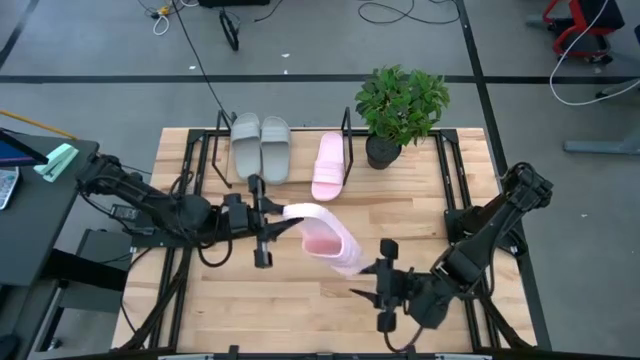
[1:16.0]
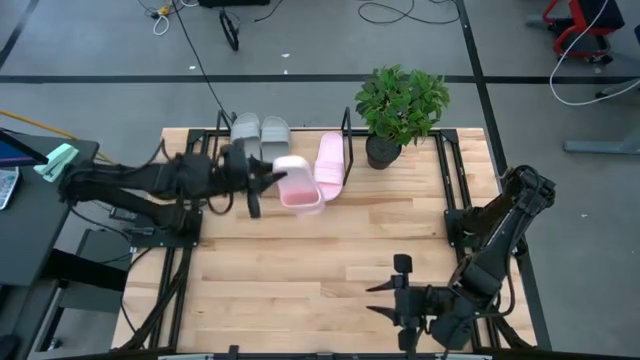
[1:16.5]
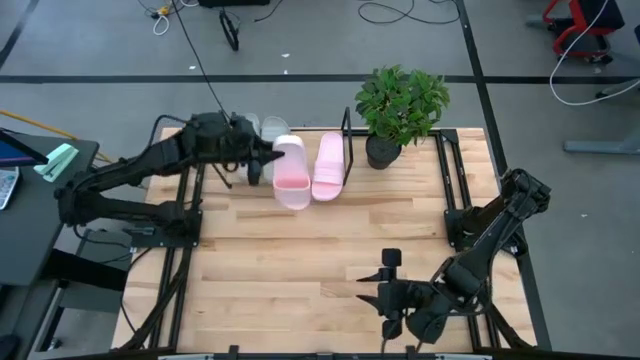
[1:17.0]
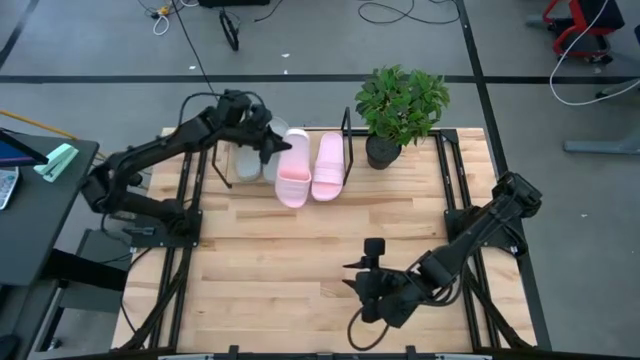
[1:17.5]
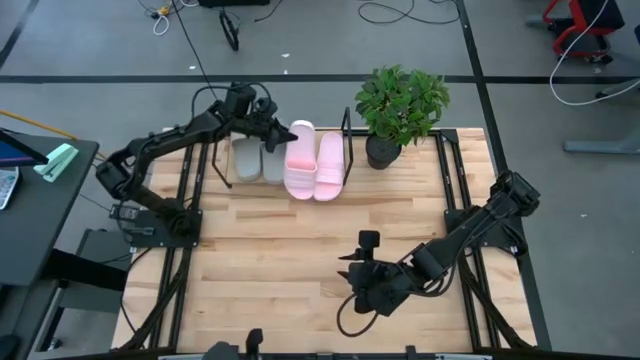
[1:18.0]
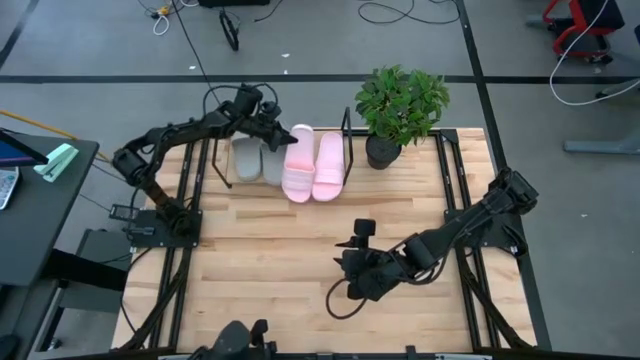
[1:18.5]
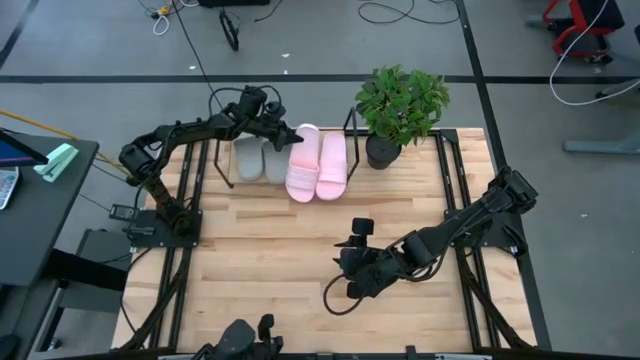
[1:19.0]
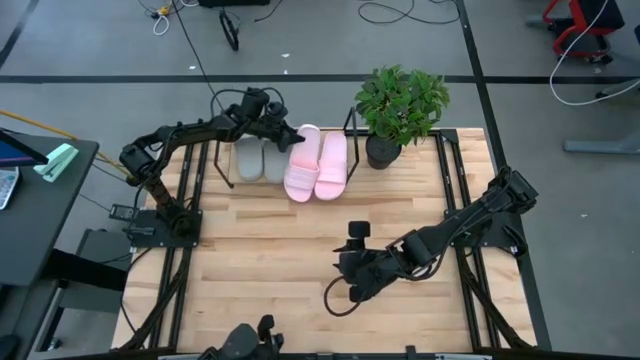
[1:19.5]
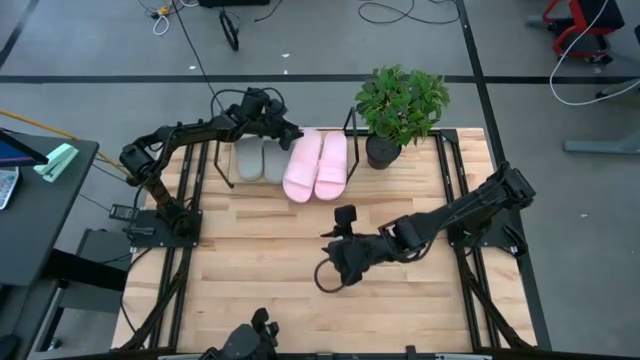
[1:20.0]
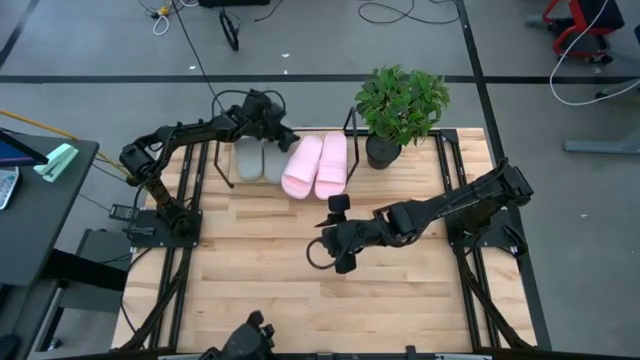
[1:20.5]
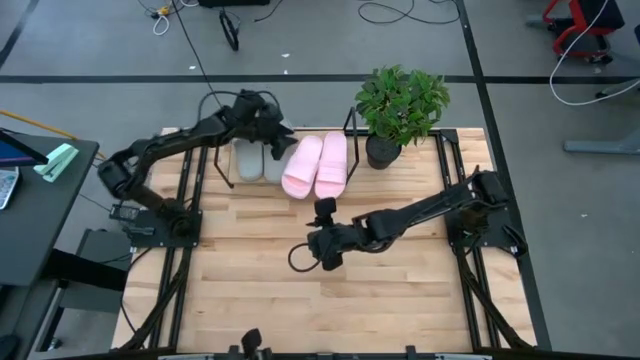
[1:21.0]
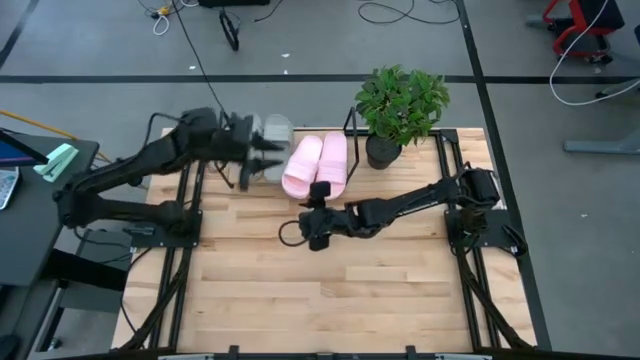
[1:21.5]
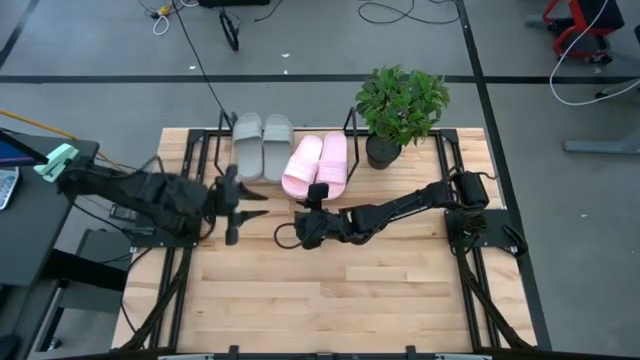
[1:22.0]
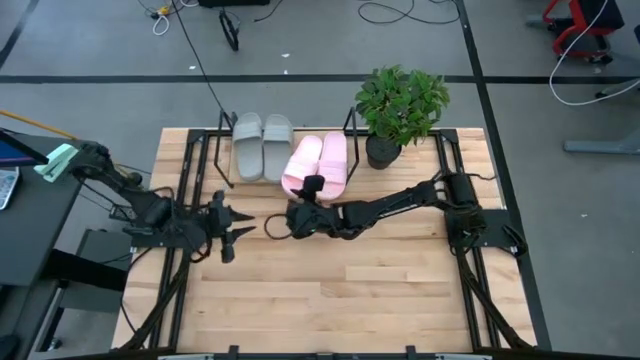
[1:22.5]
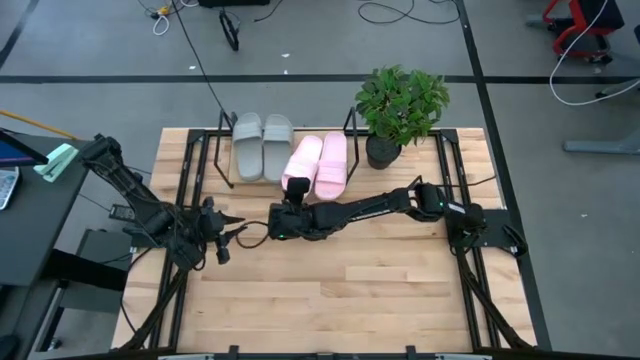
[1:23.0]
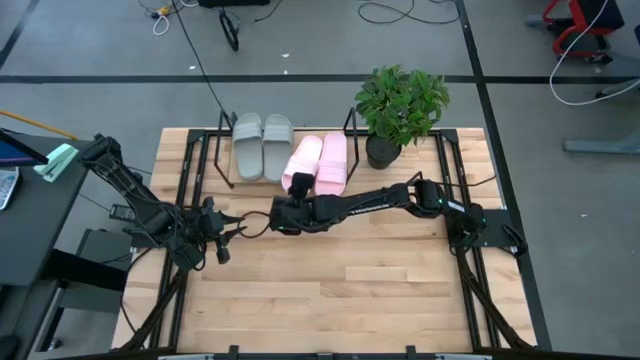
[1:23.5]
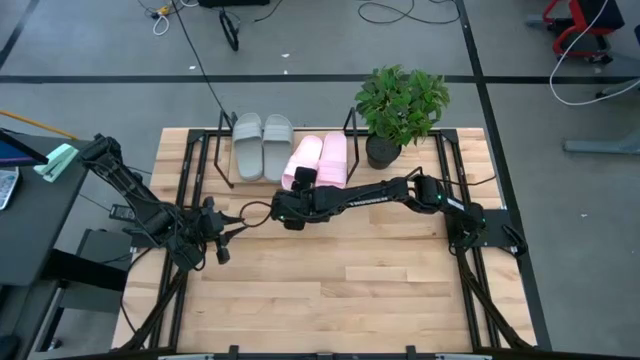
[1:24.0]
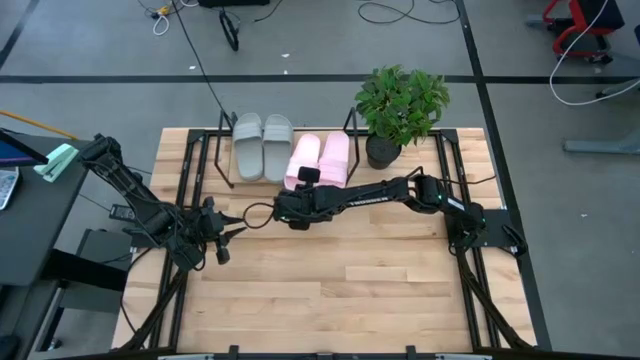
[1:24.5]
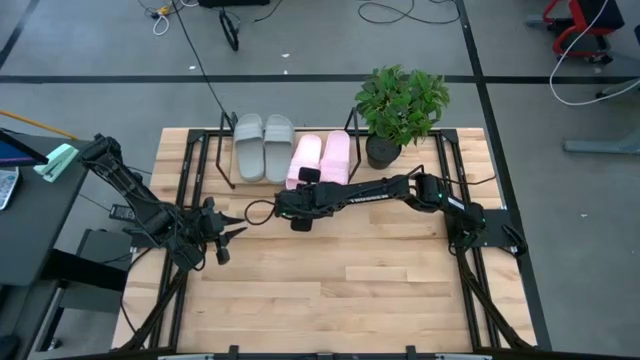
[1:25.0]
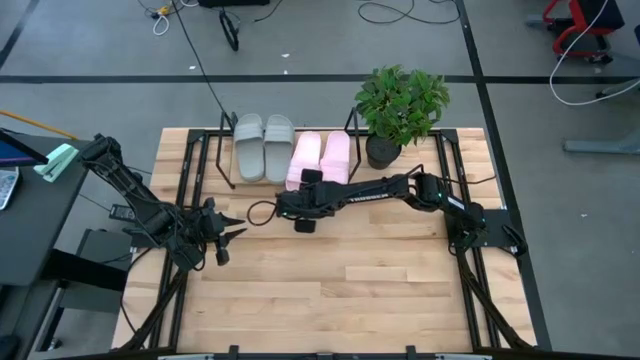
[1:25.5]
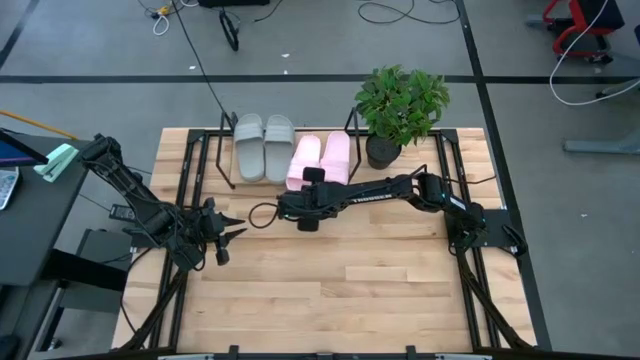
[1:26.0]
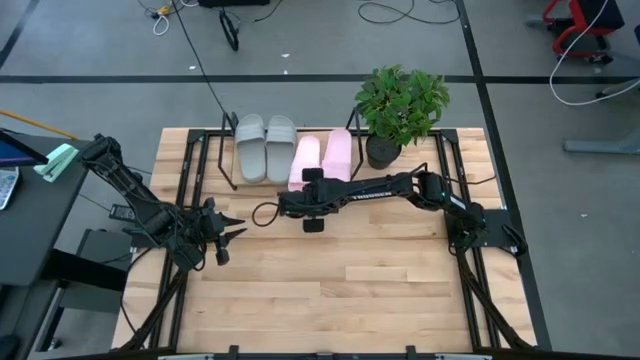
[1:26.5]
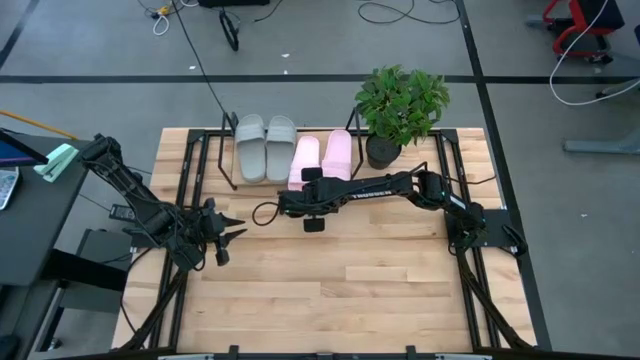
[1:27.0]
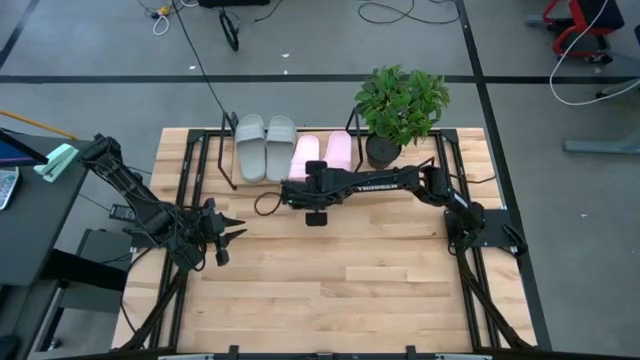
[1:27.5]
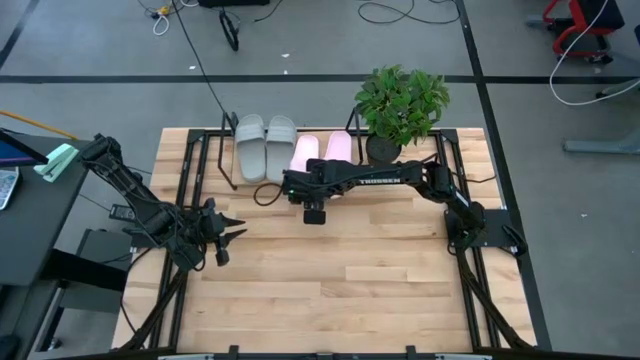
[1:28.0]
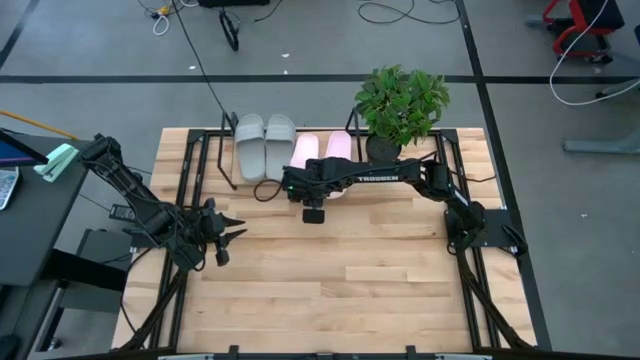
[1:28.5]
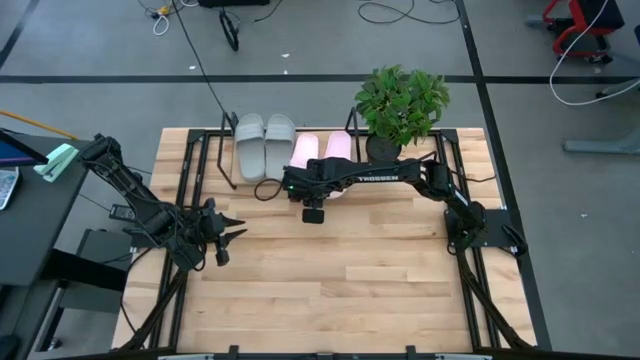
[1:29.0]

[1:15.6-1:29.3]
Task: Pick and place slides into the shelf
Put the pink slipper on the shelf

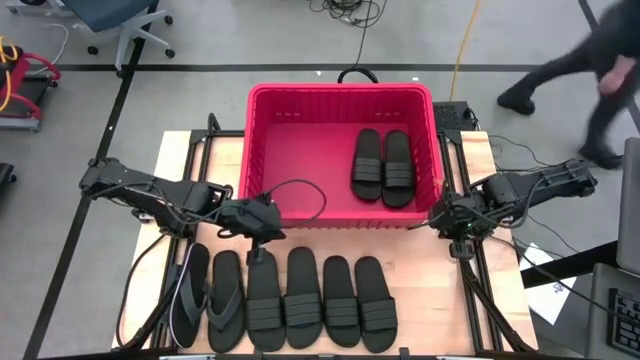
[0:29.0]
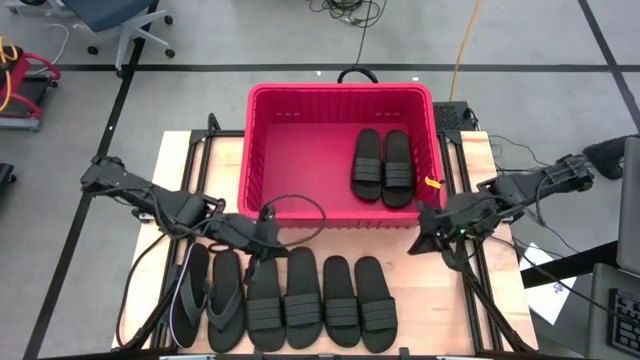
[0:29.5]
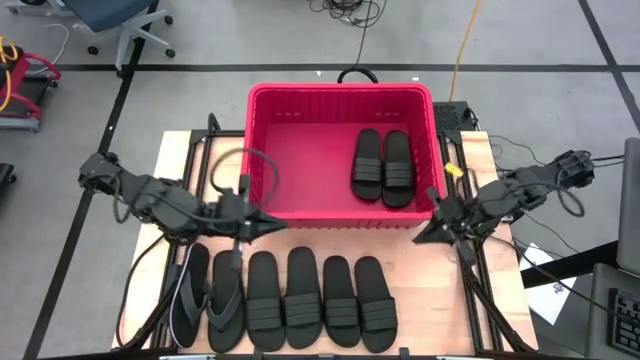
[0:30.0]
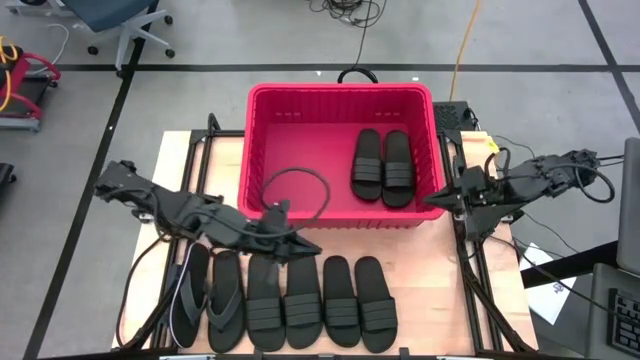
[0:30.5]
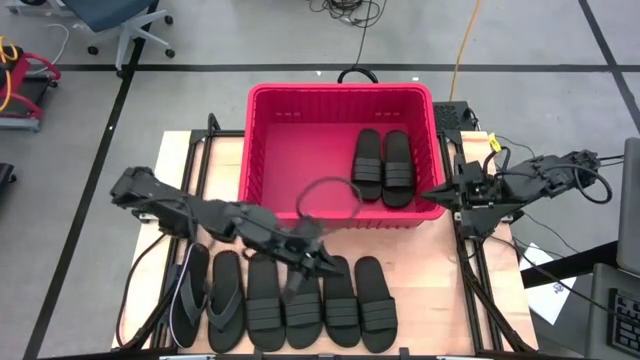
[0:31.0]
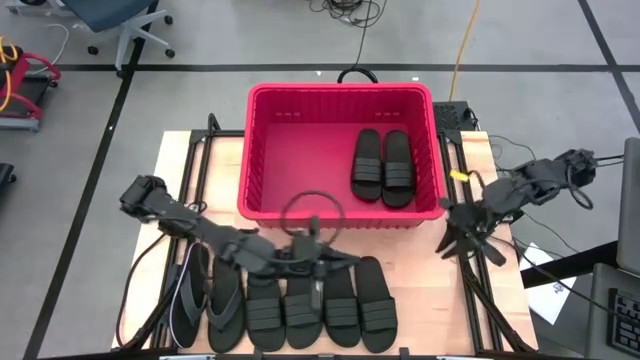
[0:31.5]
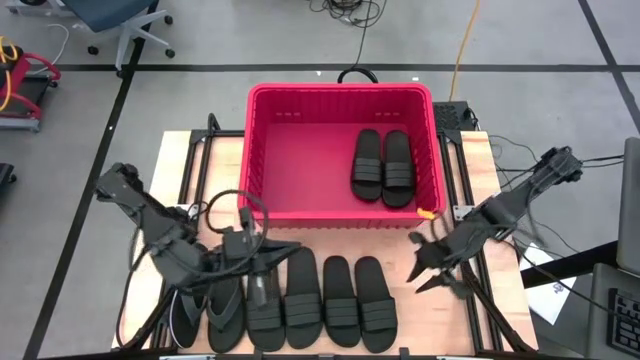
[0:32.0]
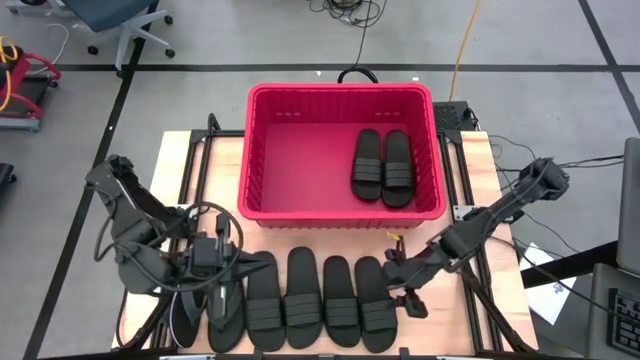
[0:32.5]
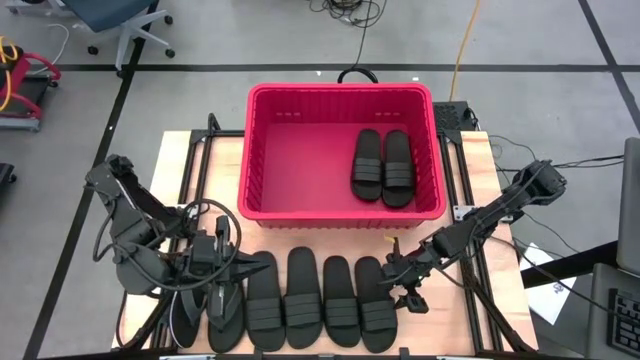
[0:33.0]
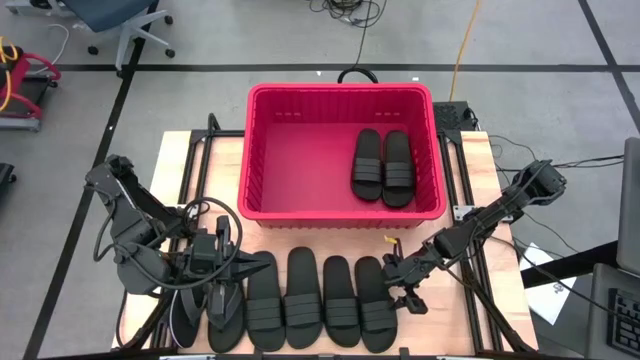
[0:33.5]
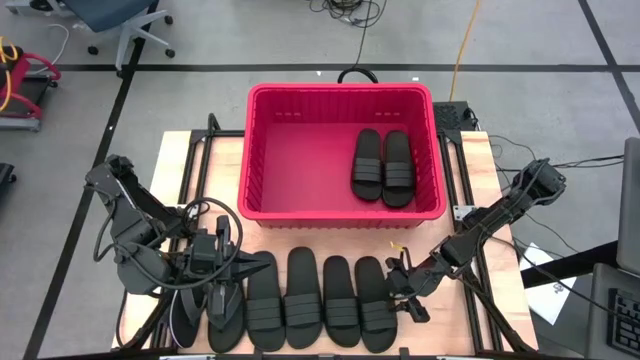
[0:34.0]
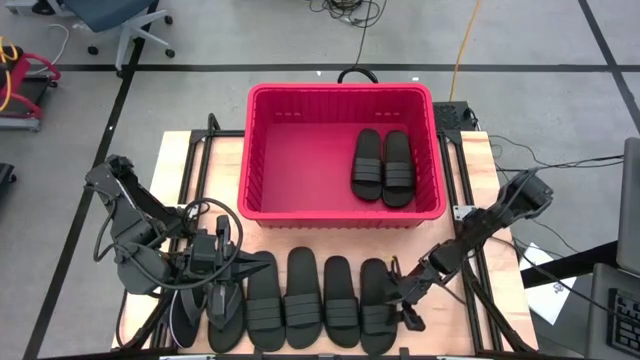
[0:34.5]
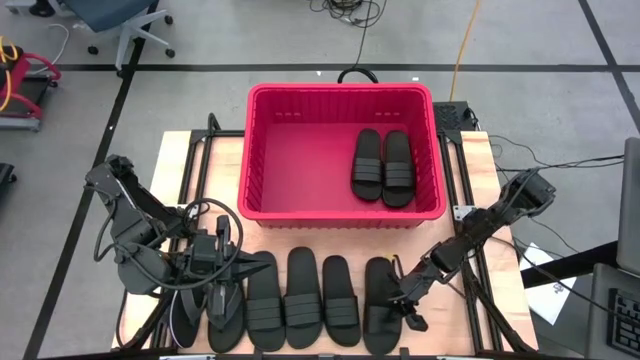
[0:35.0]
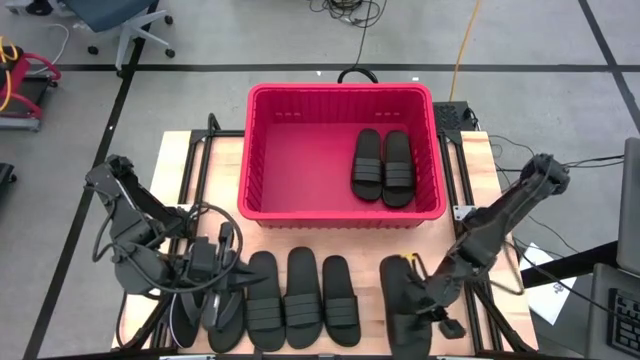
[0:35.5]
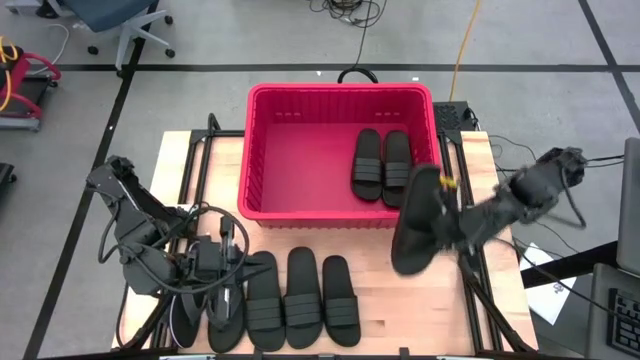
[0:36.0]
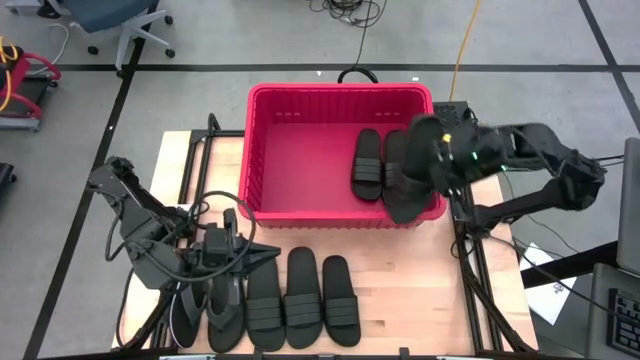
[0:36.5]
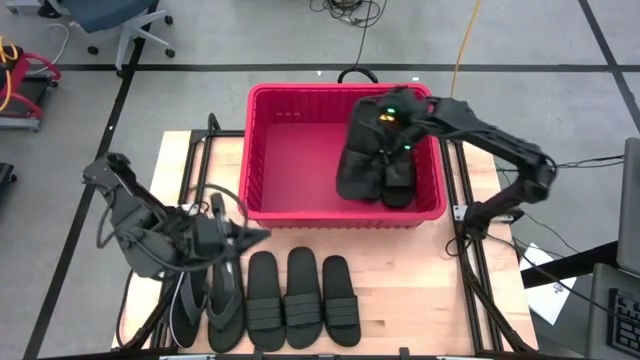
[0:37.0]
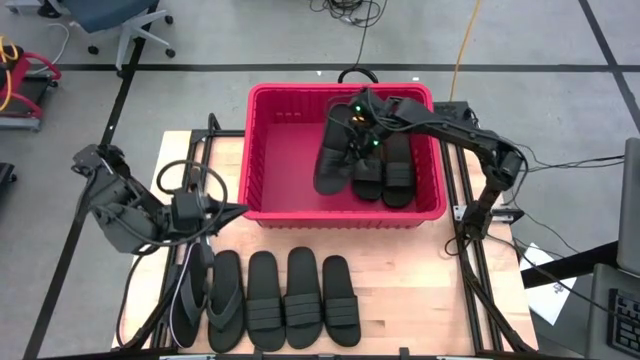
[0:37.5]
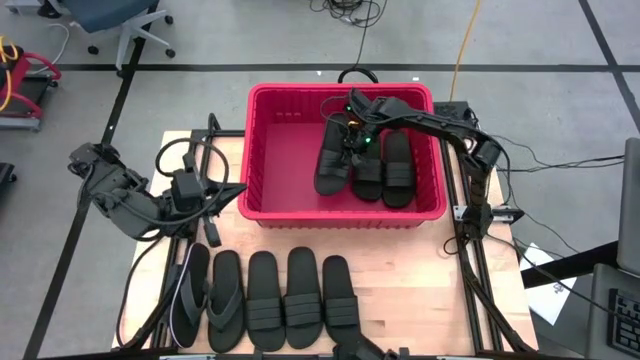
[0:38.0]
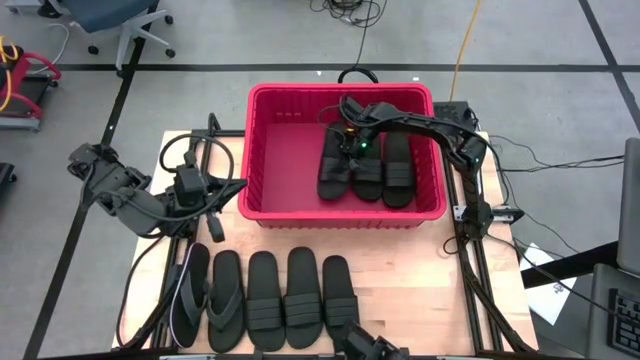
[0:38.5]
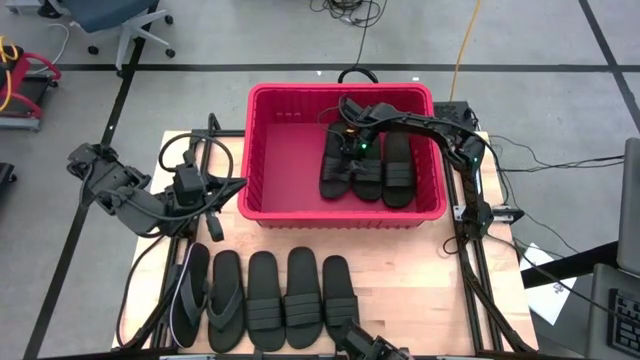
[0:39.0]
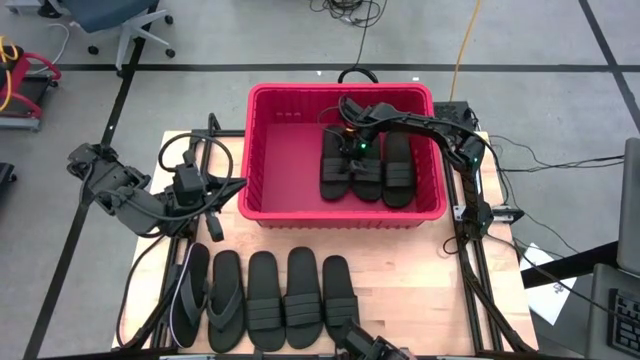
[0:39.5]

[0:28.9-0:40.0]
Task: Pick and place slides into bin
Put the black slide into the red bin
